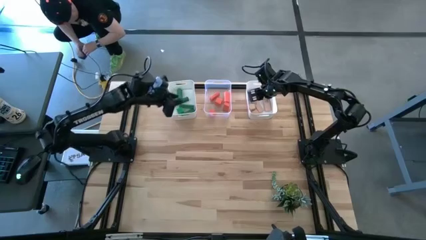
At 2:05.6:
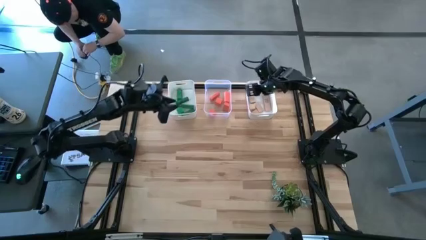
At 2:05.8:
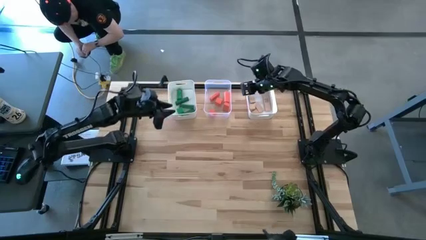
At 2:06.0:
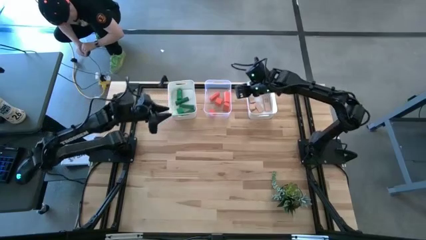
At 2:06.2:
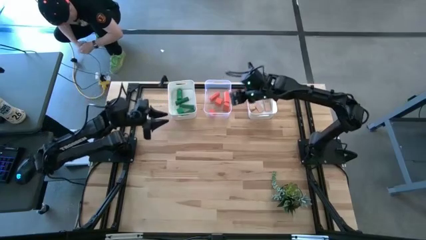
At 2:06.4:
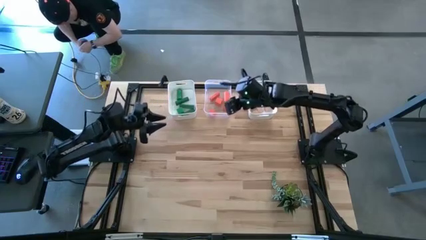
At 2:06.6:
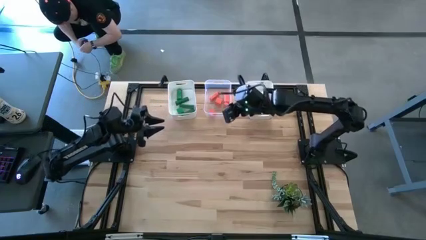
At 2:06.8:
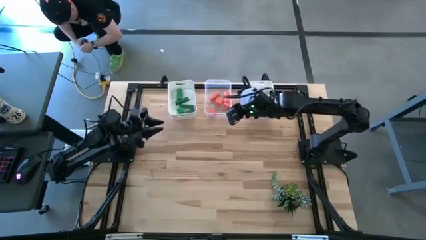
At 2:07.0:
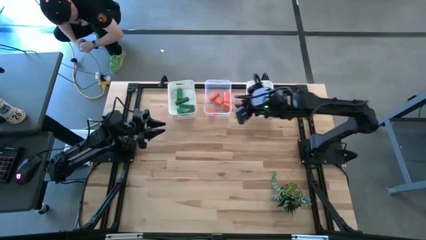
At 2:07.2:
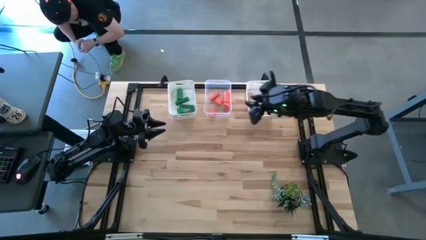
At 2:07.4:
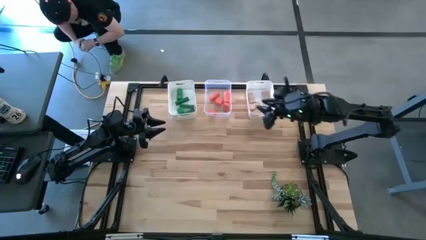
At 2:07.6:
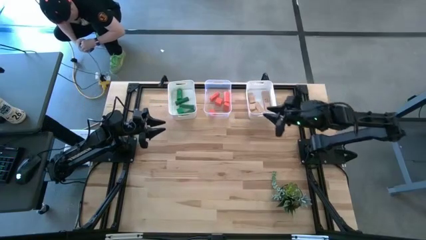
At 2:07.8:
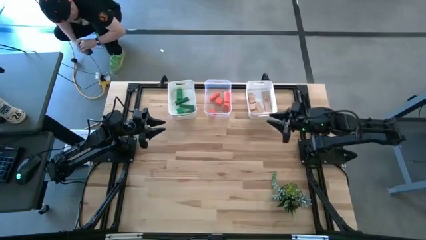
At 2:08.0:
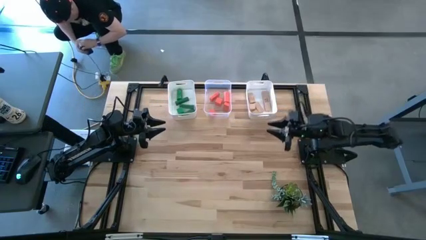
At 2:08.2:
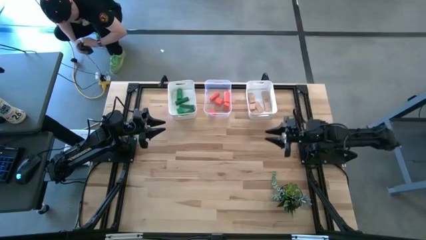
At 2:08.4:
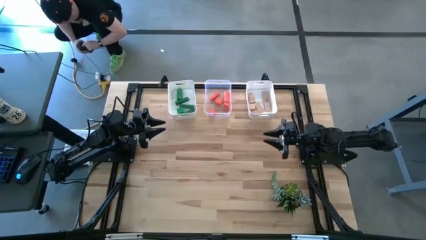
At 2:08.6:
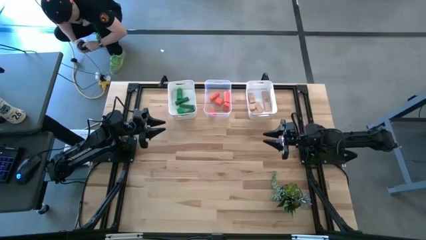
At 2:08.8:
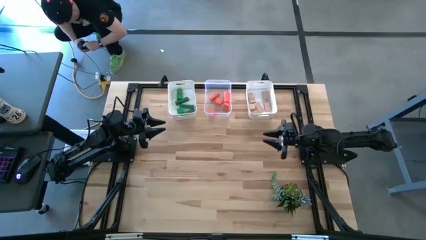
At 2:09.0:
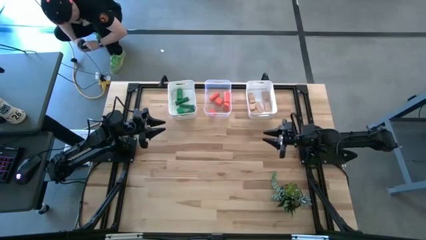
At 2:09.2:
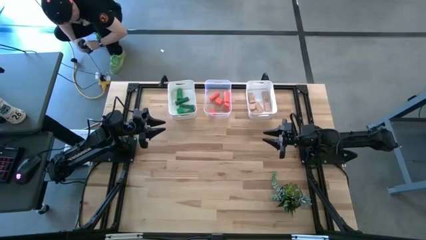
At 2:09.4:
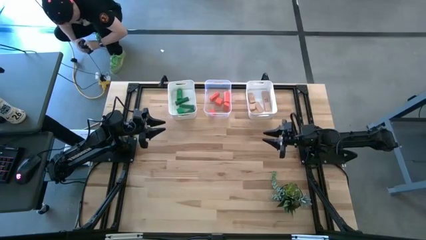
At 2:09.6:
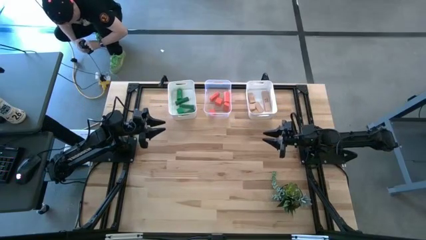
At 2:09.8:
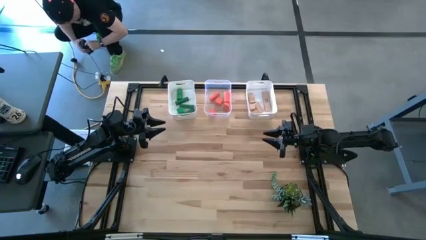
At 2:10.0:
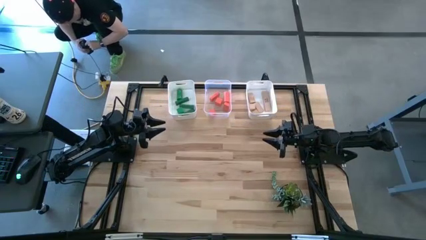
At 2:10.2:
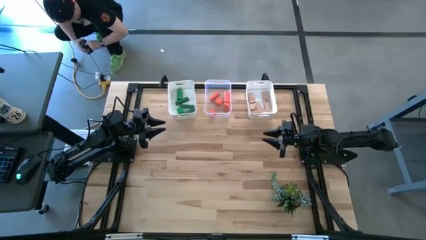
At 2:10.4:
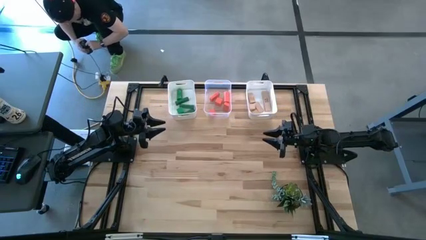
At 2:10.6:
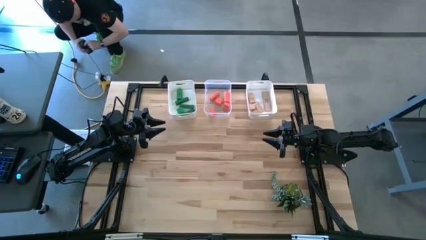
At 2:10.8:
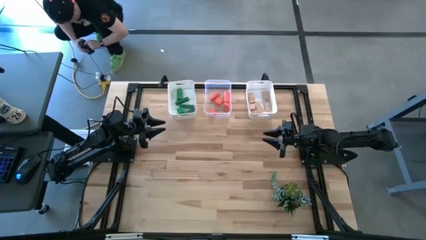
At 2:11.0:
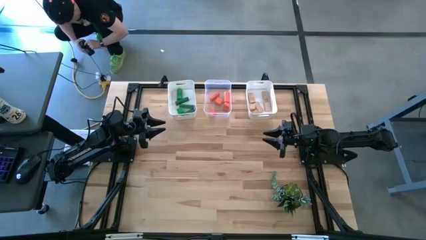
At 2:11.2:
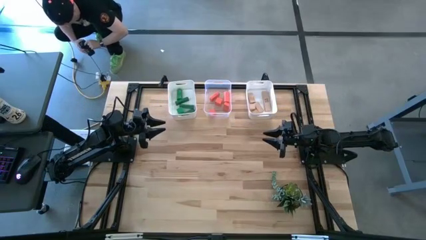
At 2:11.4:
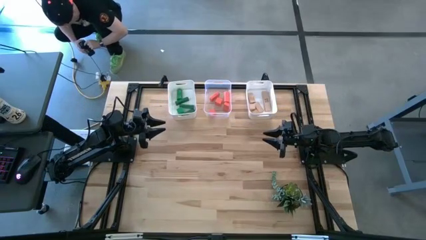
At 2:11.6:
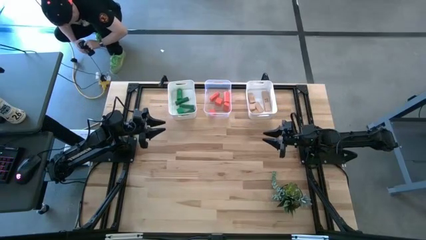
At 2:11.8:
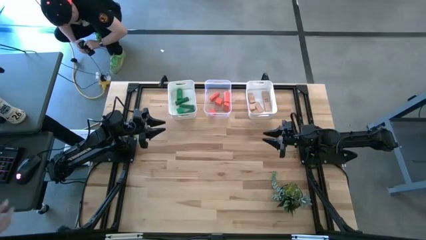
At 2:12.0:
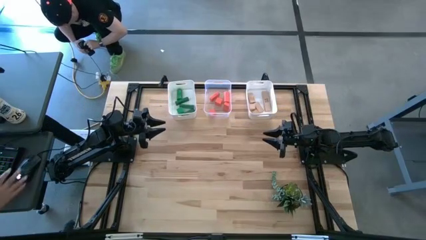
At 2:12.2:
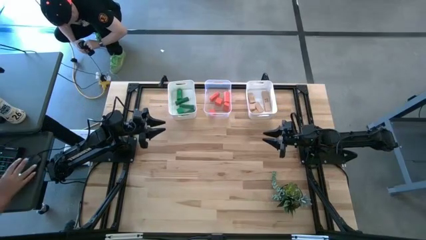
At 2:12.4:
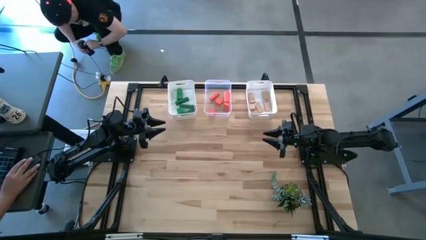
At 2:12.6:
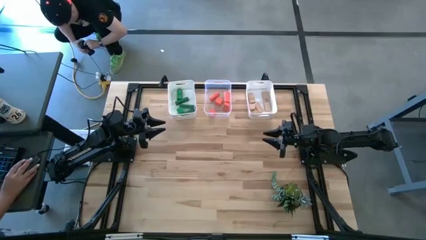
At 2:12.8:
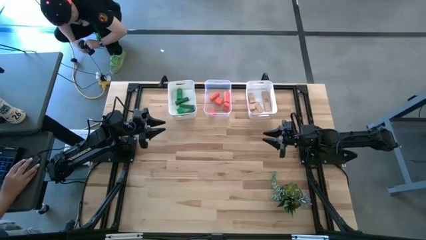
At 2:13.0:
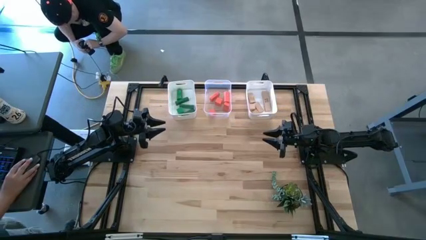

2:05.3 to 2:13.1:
Task: Sort & place blocks by color
Return to Home Position

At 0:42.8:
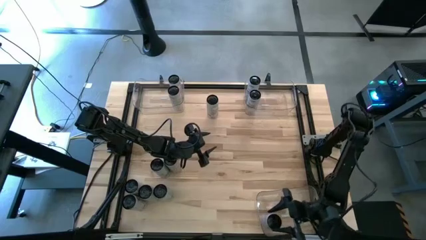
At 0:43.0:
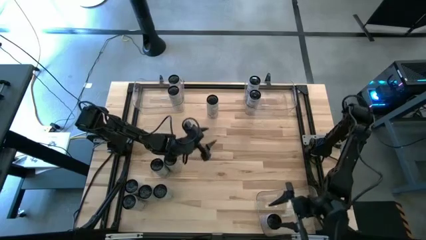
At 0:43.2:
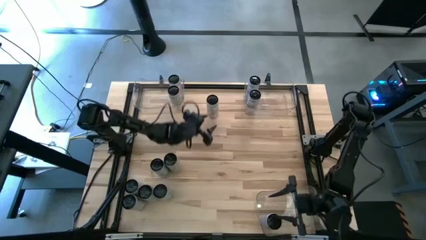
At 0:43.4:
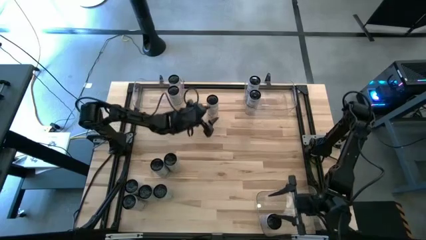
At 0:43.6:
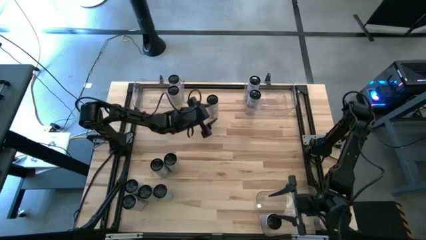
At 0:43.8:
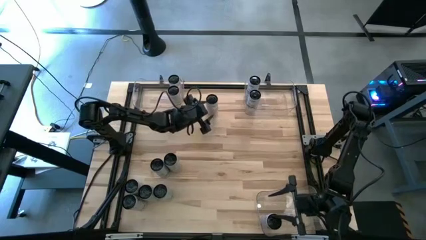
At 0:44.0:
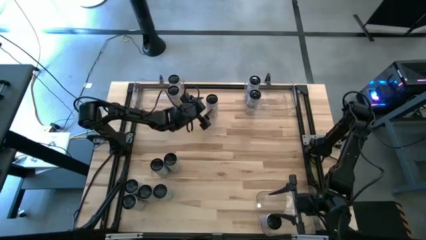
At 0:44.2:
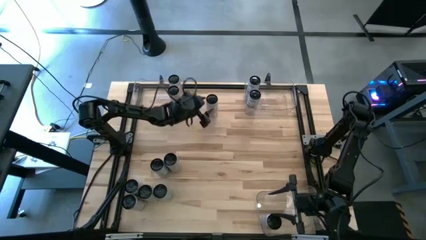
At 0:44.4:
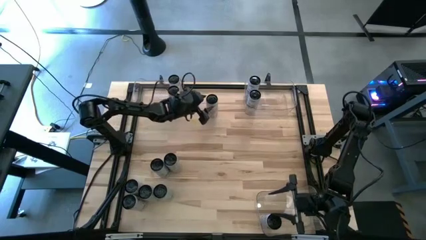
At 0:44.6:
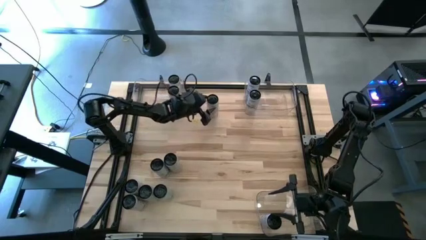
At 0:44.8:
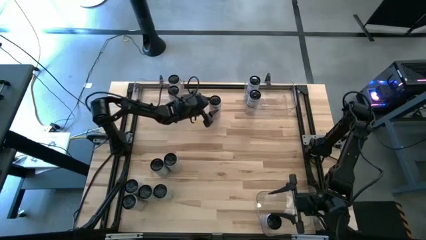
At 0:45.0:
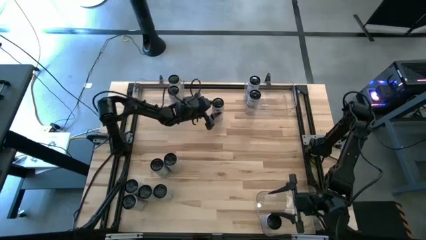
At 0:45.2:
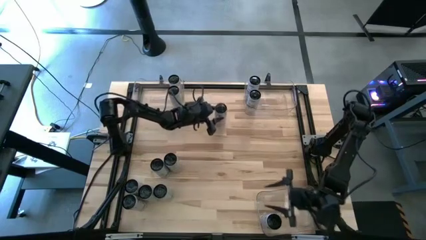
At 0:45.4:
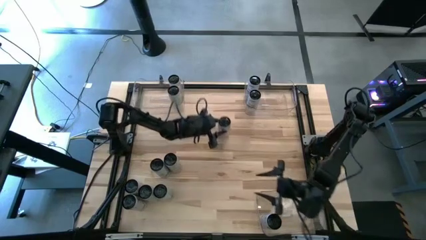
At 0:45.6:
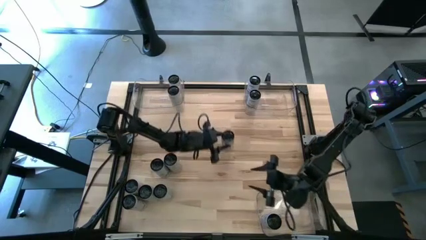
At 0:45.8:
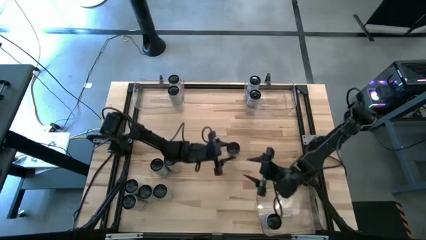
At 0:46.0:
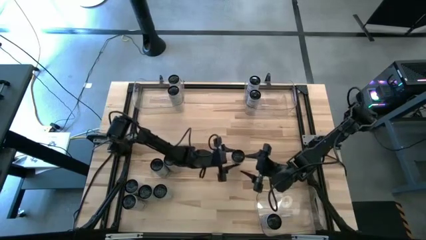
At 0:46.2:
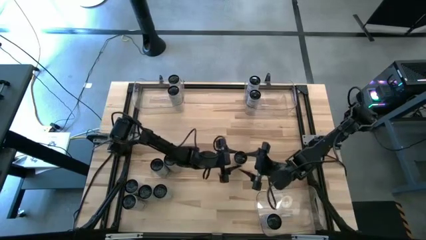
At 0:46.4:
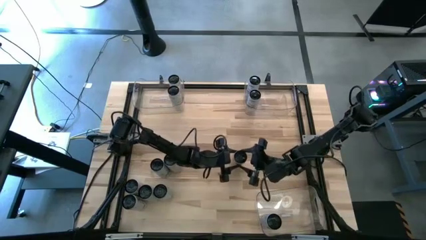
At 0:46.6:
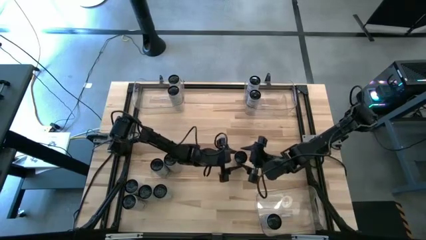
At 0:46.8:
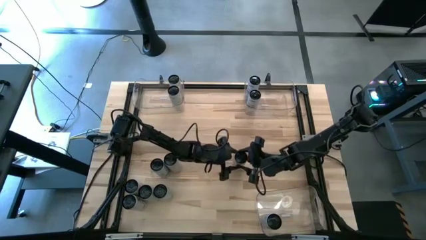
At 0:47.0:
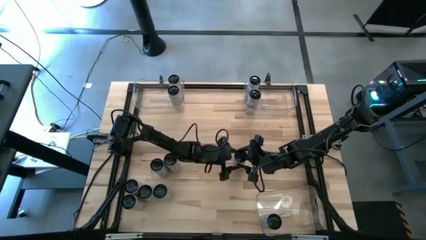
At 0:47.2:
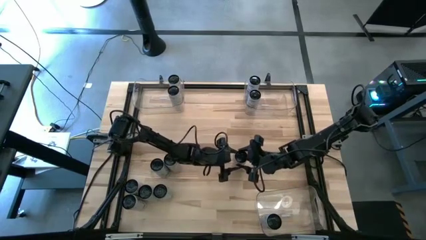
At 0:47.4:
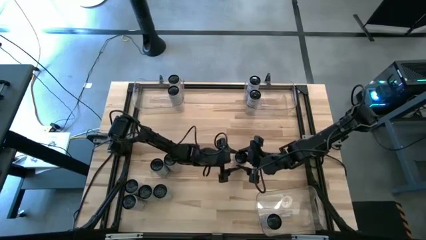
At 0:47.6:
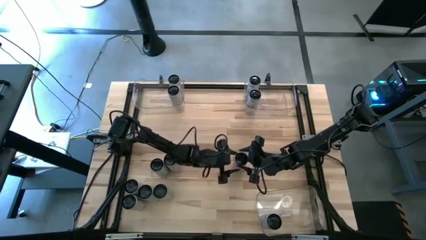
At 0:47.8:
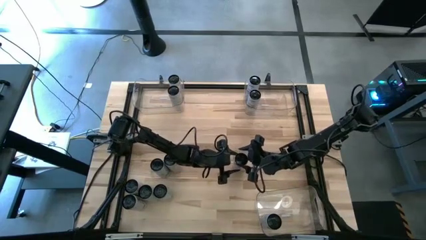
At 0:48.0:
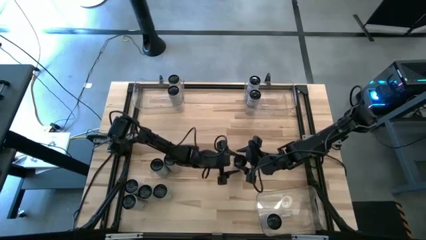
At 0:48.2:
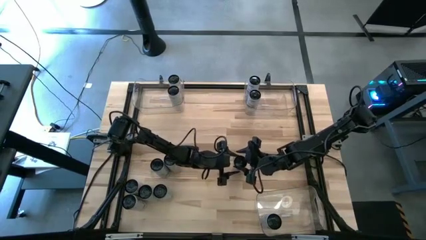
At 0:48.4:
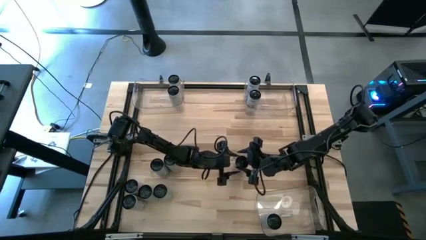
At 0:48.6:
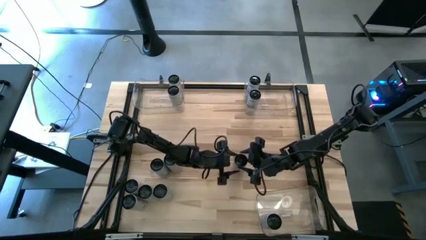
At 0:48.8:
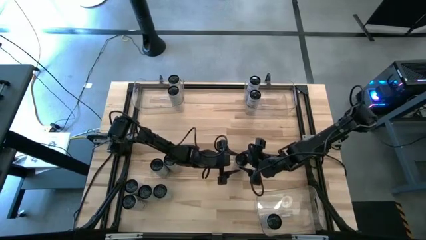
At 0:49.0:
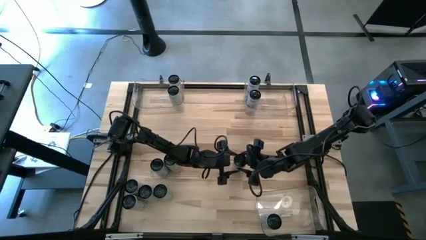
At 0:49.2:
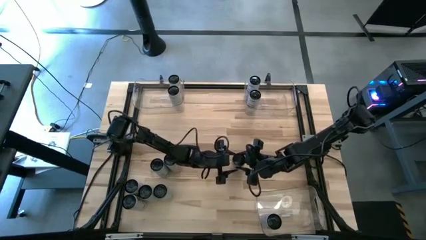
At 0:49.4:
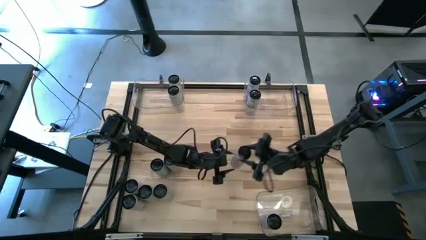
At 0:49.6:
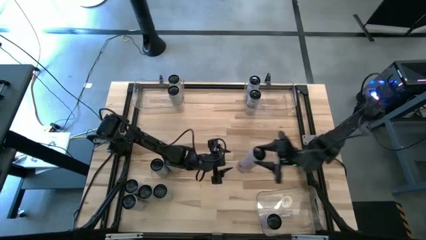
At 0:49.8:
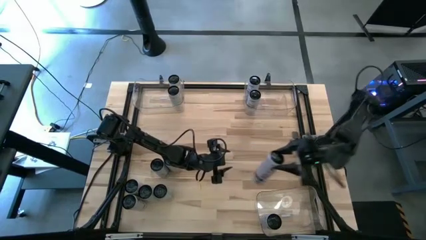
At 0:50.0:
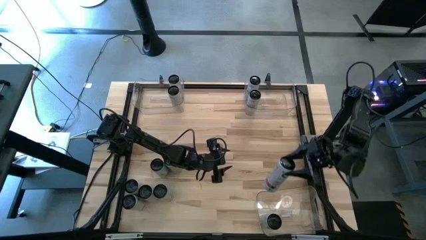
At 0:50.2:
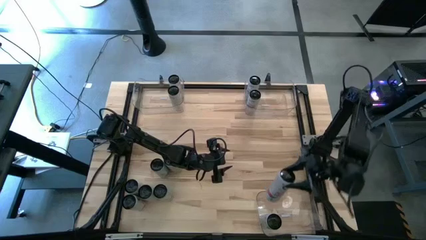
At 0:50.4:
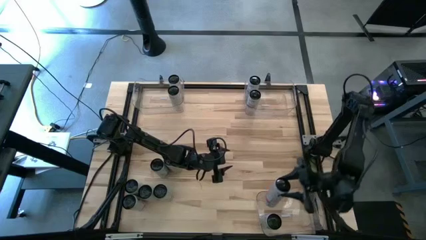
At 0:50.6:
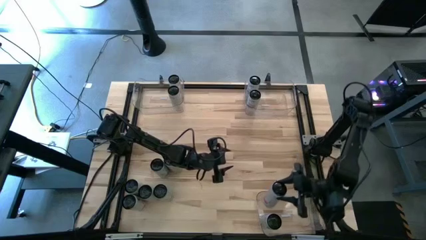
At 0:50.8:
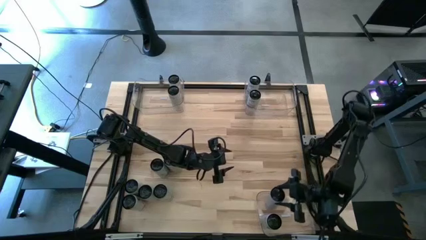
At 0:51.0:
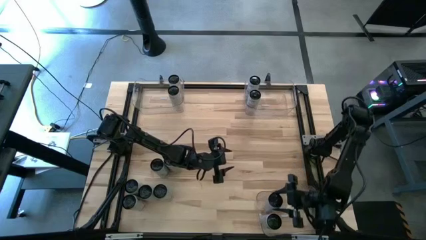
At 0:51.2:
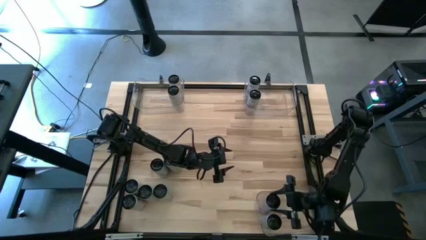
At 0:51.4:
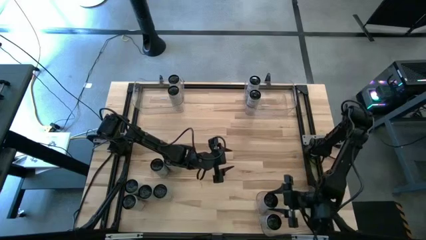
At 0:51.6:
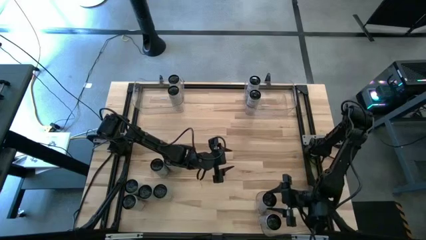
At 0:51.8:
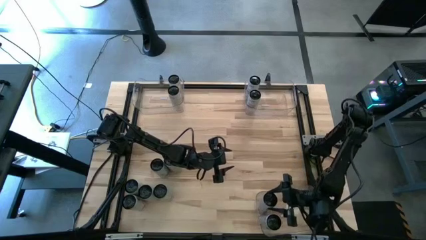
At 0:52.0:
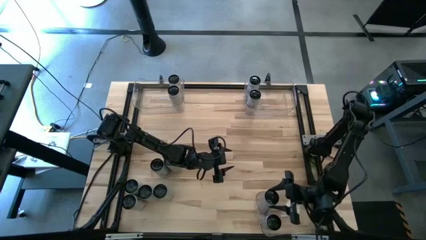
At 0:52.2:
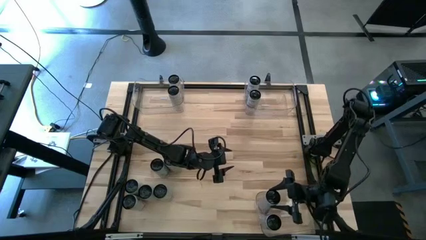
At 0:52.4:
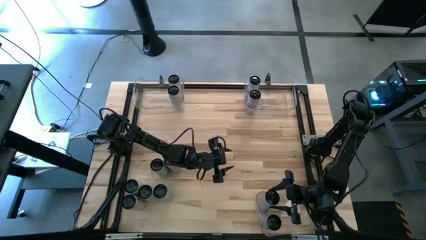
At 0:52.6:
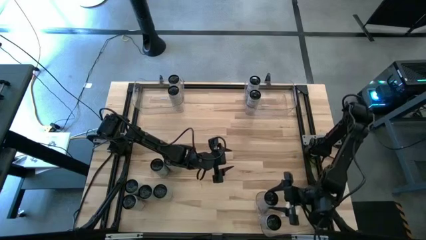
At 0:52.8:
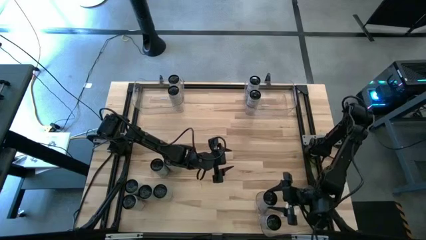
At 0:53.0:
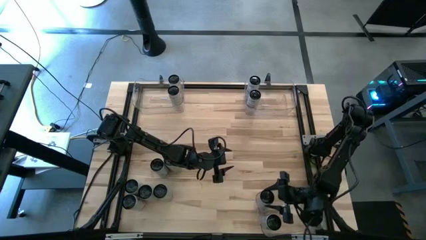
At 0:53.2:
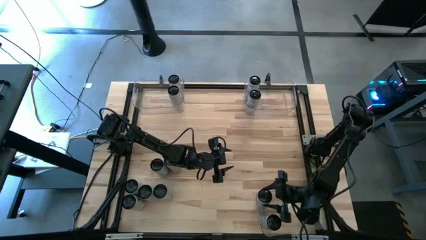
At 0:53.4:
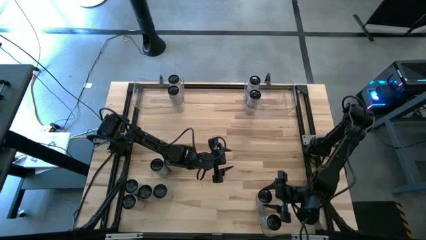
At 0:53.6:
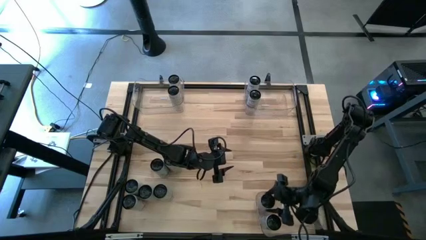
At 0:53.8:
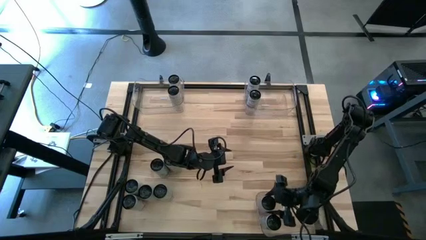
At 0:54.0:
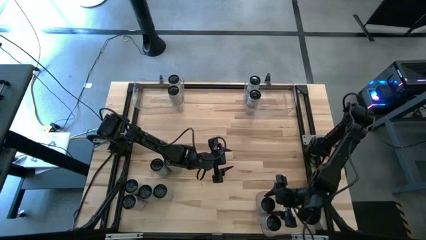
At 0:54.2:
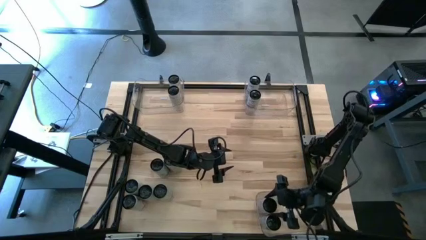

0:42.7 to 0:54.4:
Task: Sort soda cans
Put the white-pink soda can into the bottom right transparent bin
